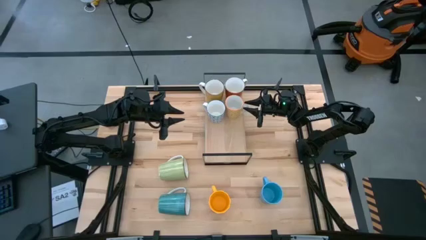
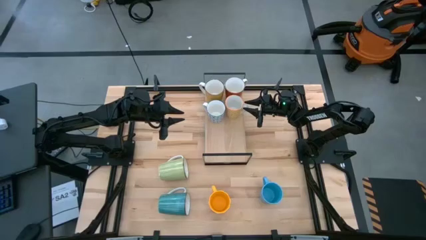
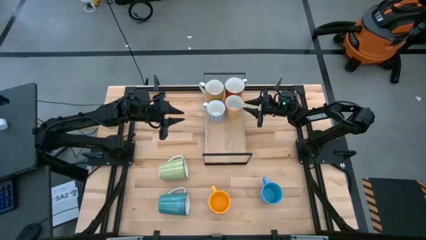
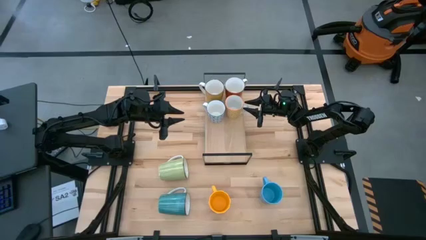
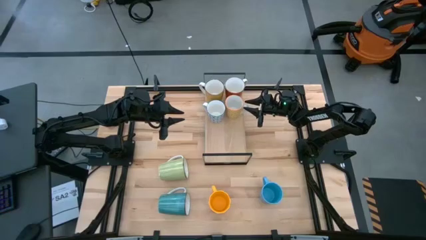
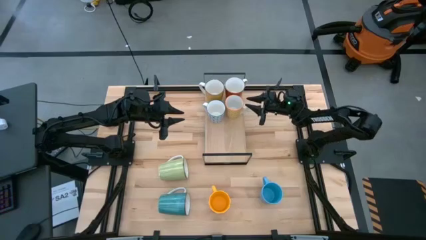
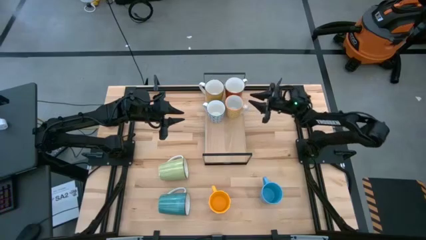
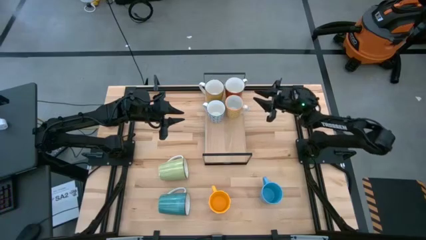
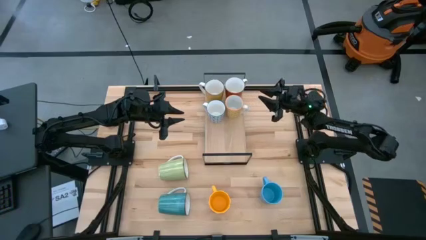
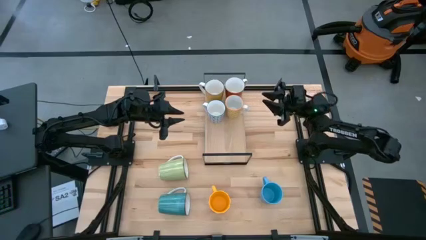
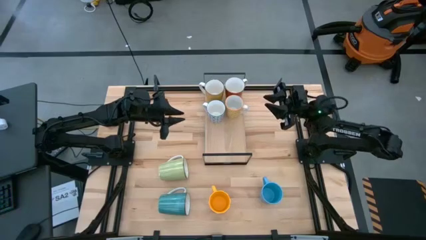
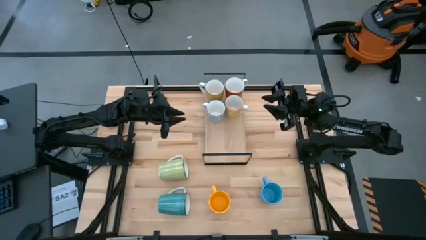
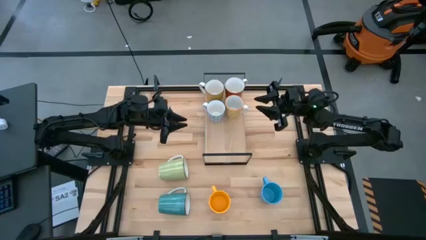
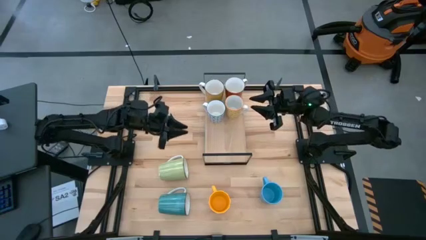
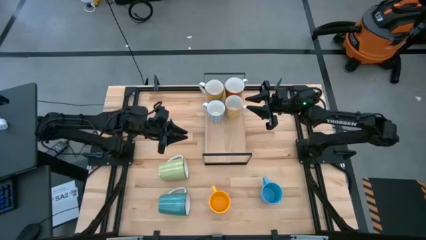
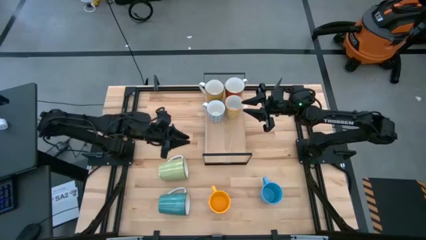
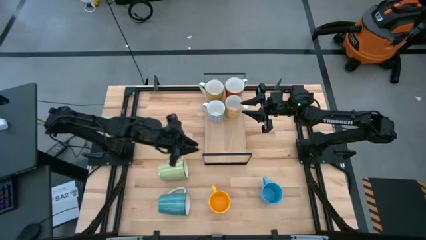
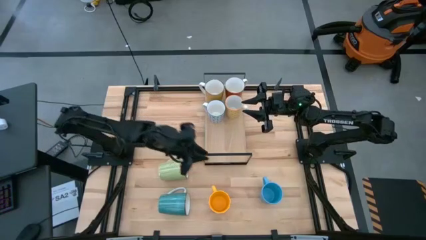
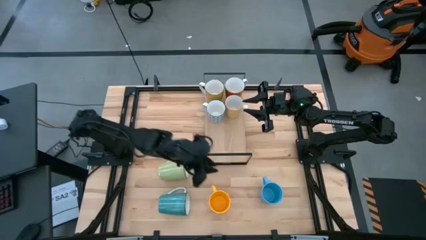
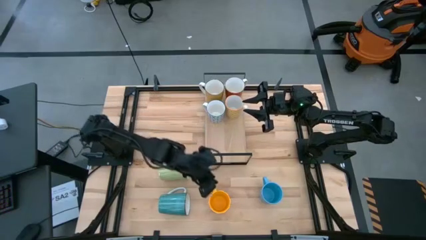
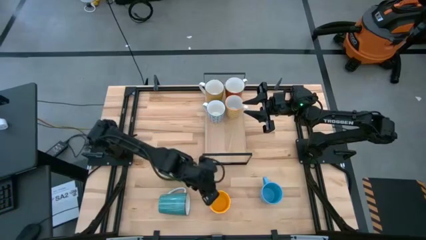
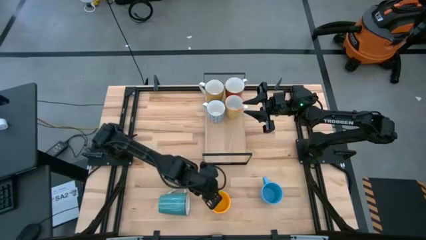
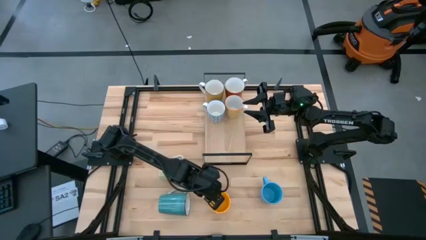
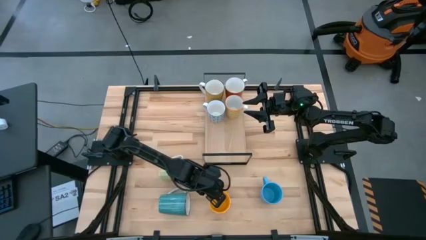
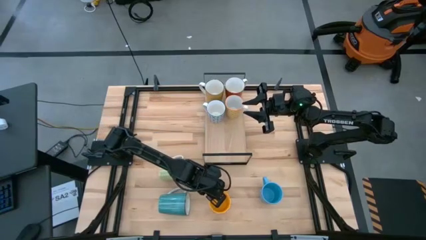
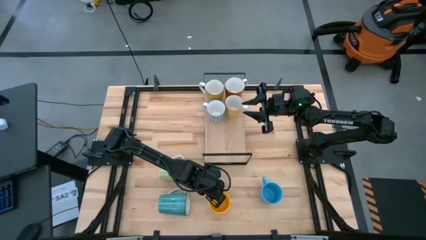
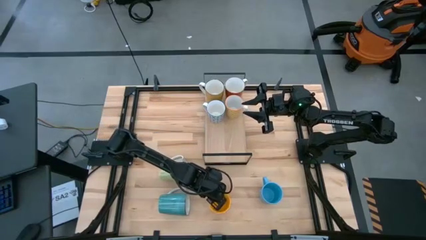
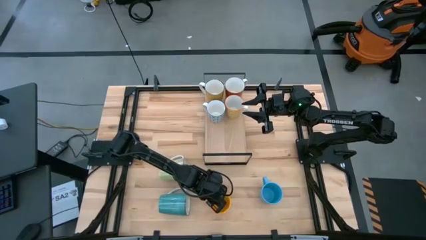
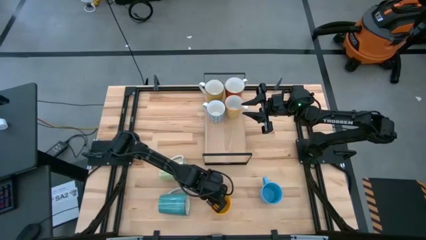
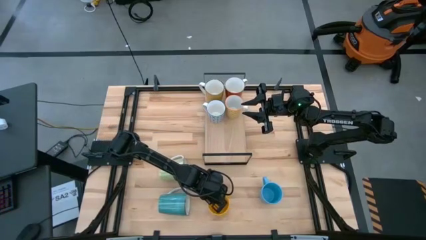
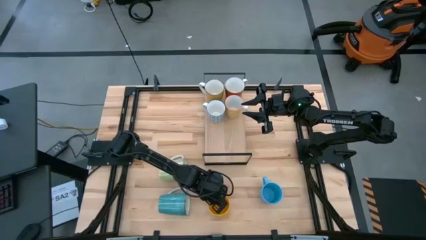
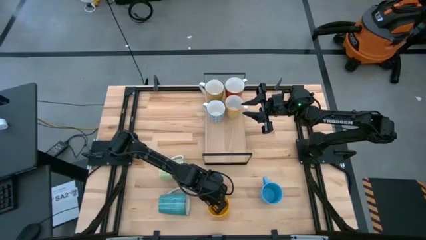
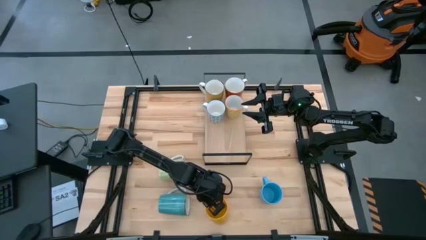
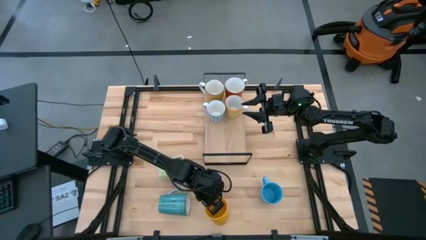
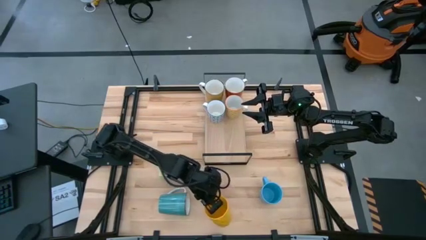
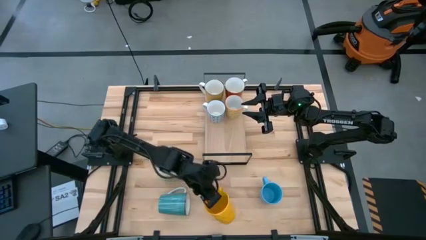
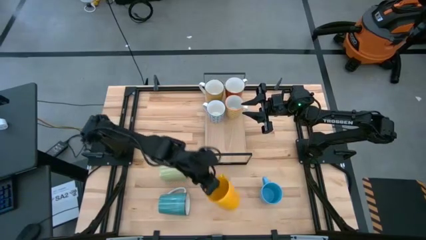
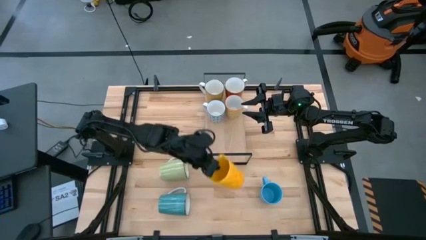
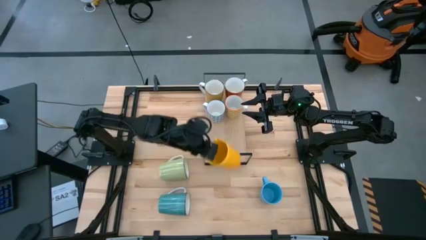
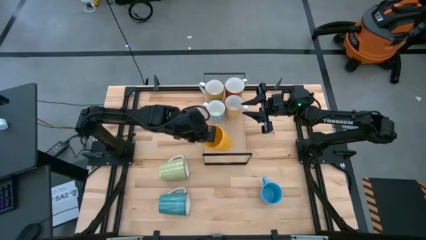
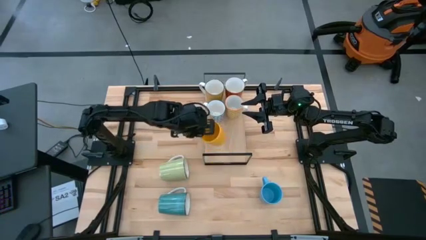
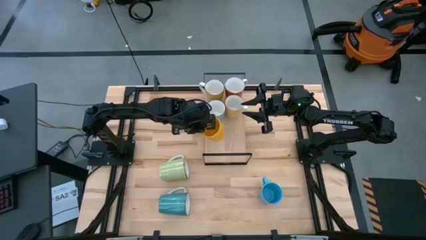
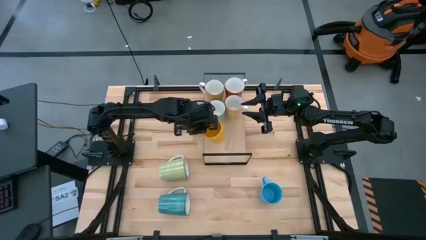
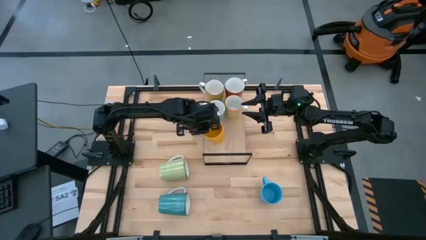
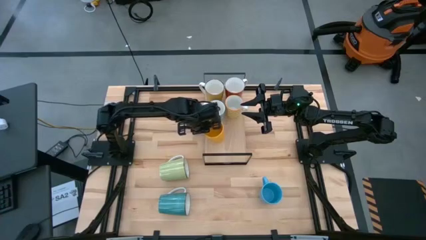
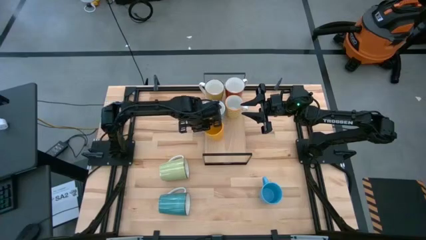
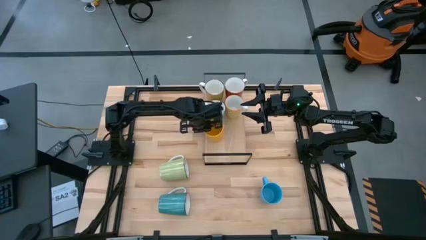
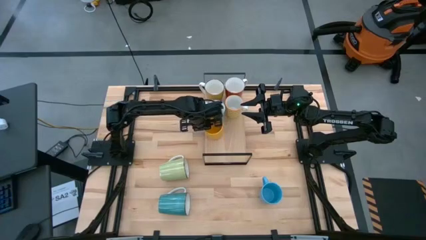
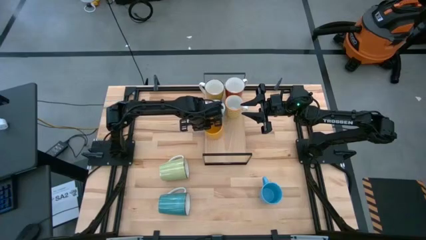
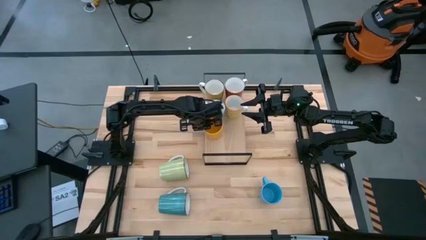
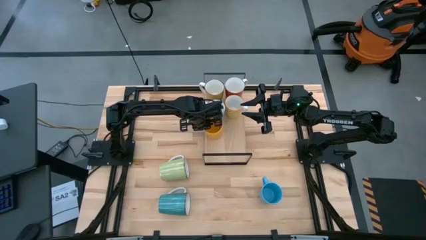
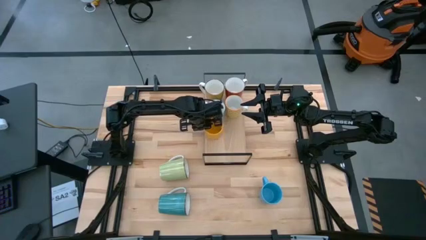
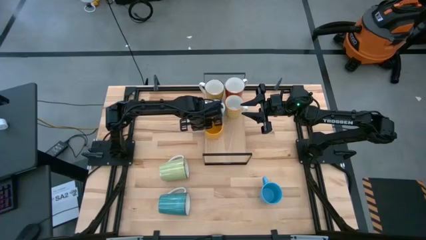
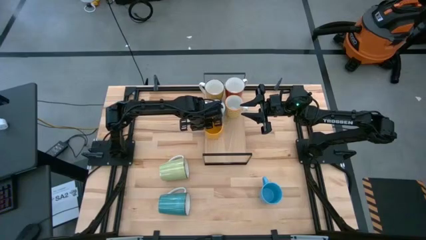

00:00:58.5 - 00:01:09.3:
Task: Place coffee mugs
Put the yellow mug on the shelf
